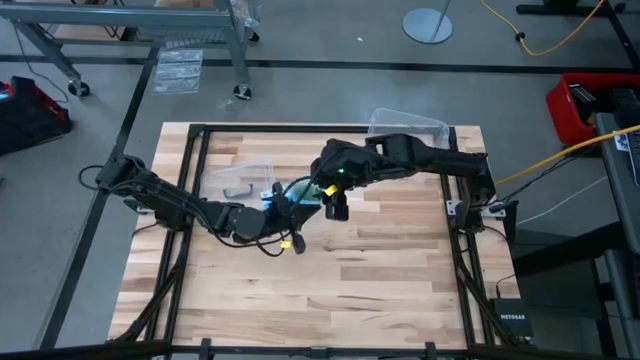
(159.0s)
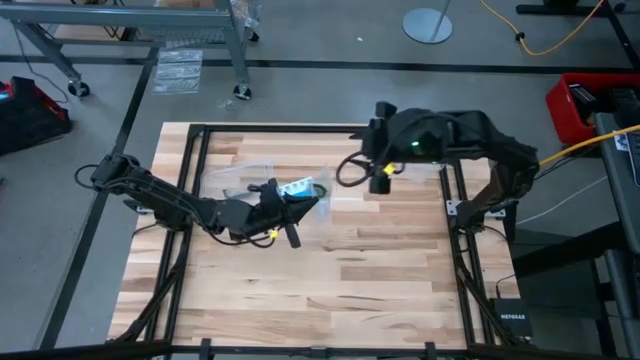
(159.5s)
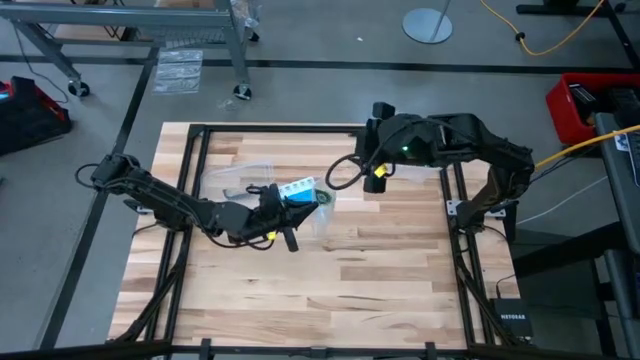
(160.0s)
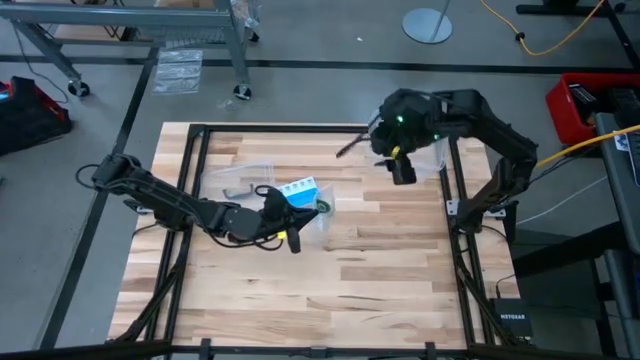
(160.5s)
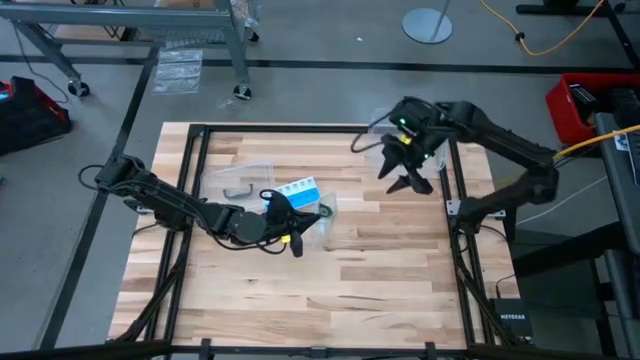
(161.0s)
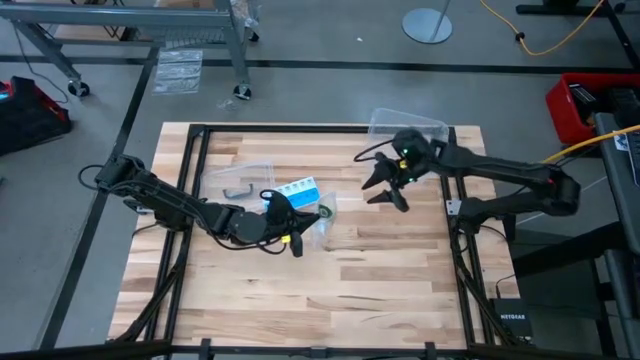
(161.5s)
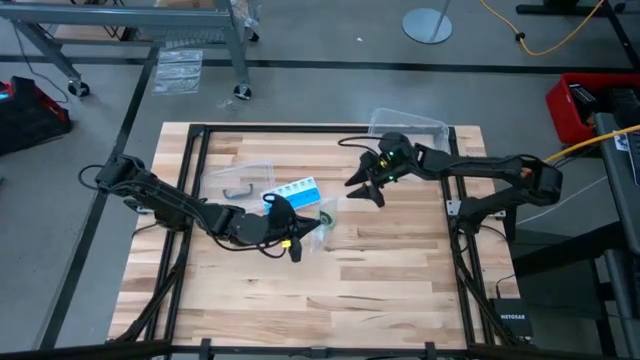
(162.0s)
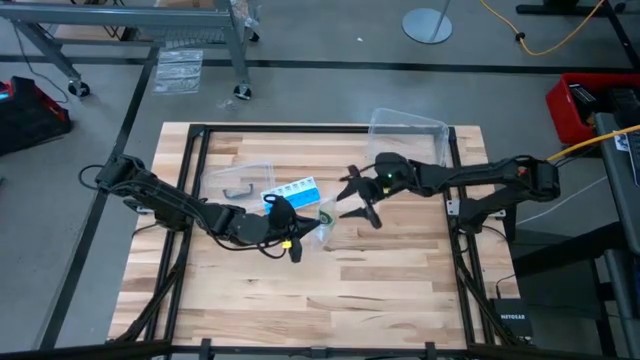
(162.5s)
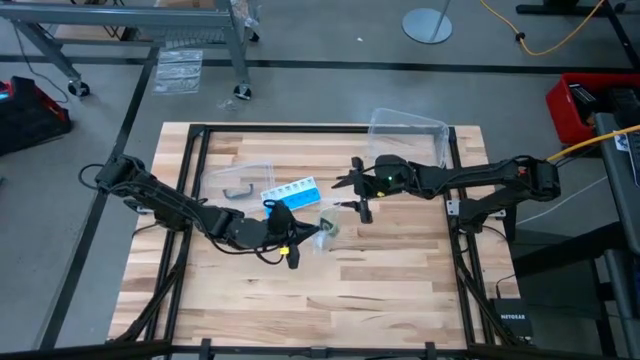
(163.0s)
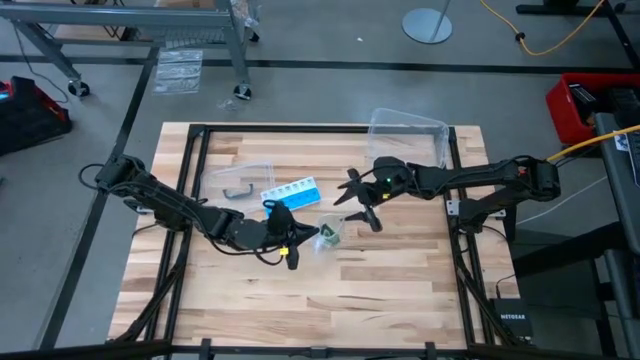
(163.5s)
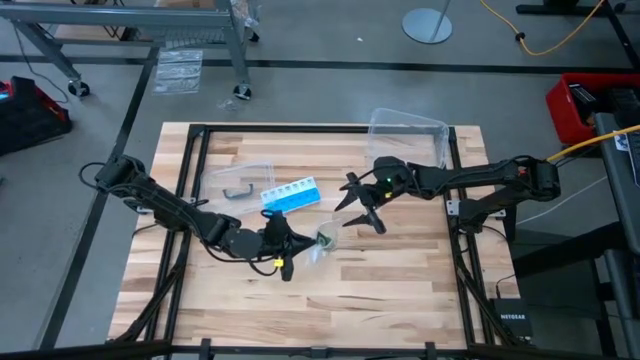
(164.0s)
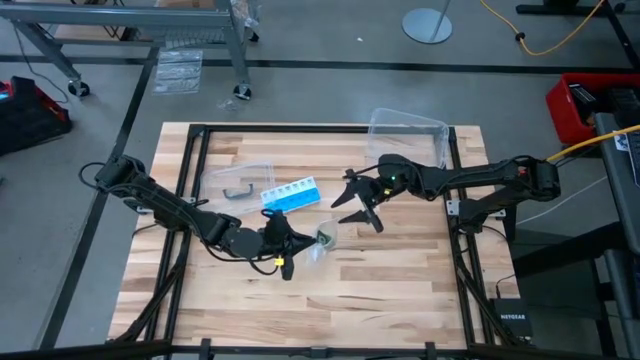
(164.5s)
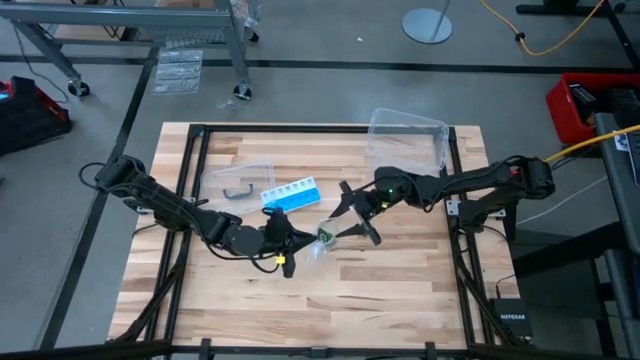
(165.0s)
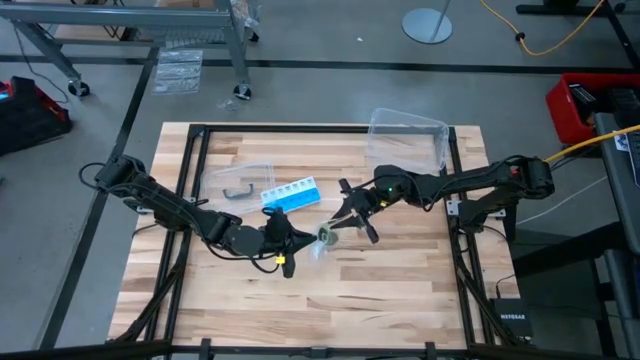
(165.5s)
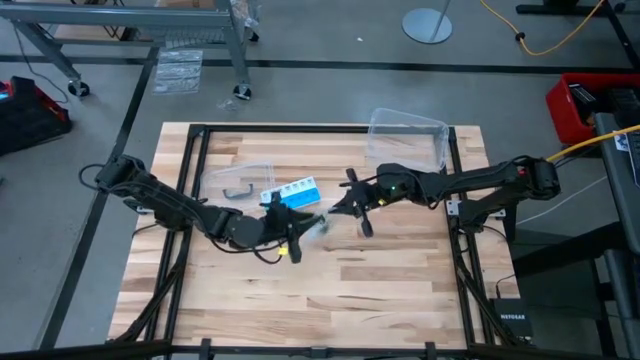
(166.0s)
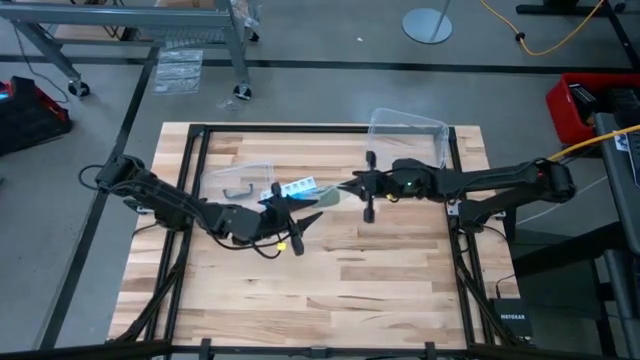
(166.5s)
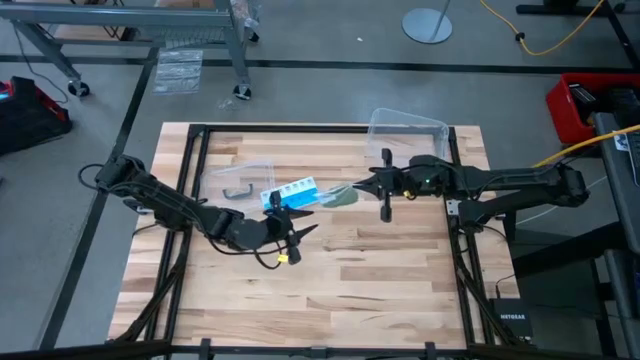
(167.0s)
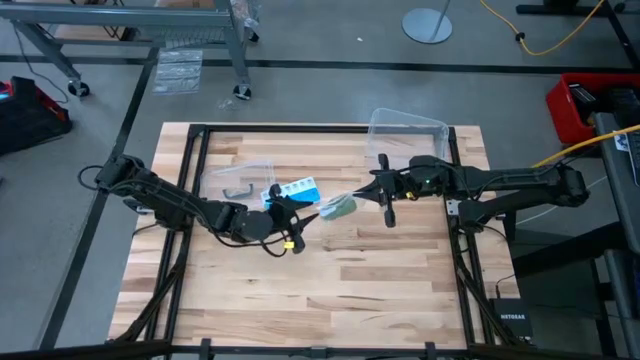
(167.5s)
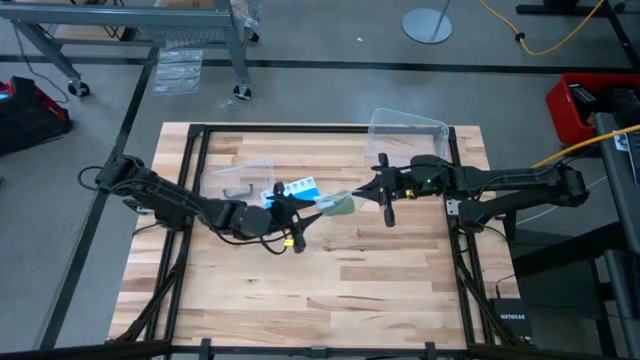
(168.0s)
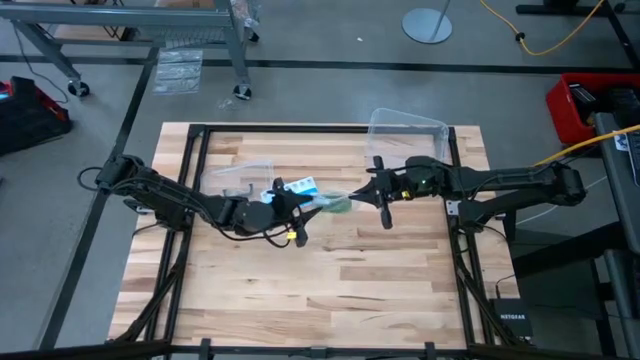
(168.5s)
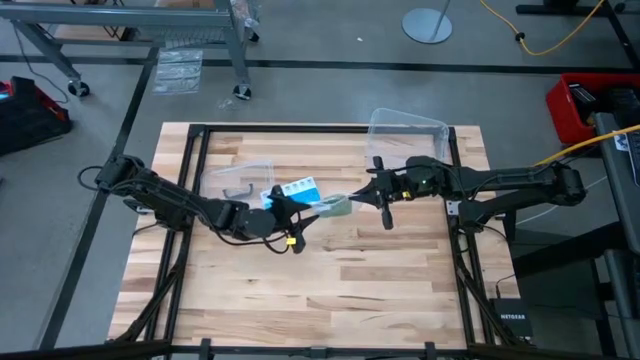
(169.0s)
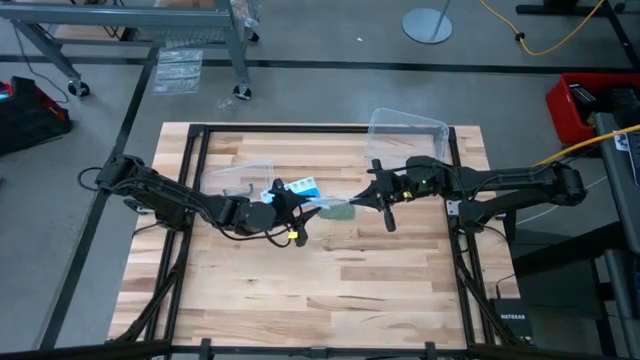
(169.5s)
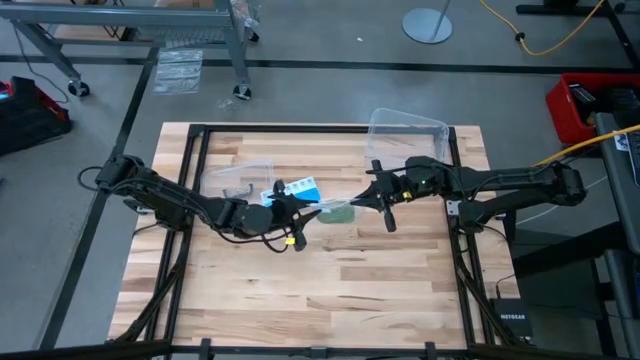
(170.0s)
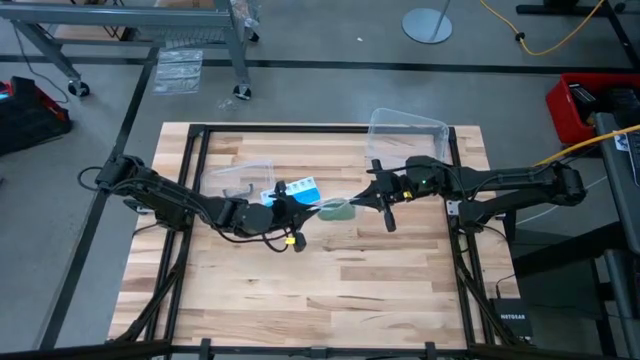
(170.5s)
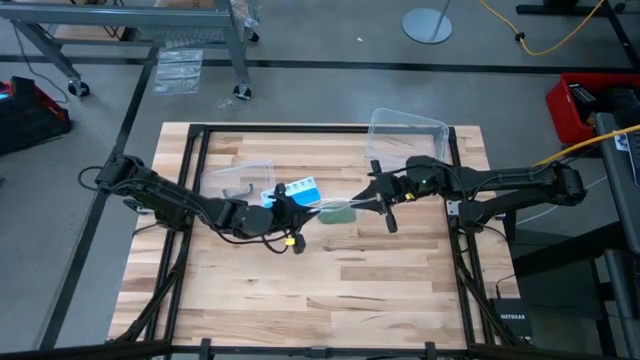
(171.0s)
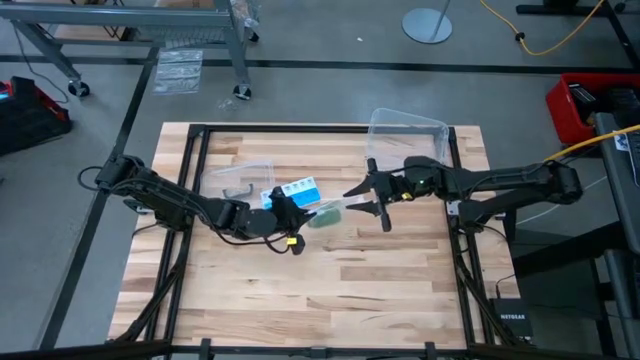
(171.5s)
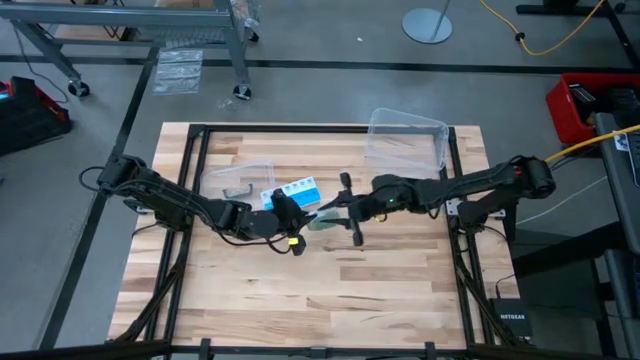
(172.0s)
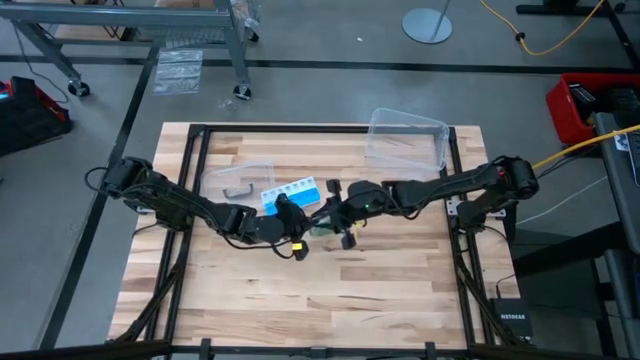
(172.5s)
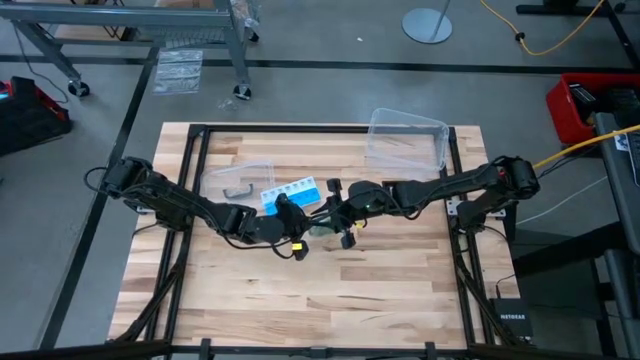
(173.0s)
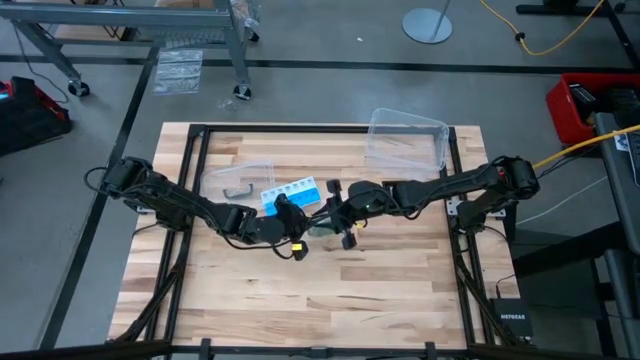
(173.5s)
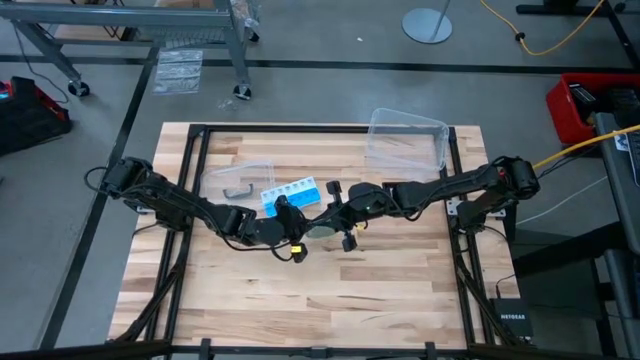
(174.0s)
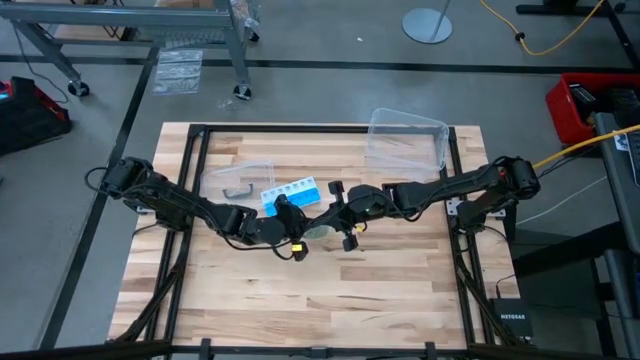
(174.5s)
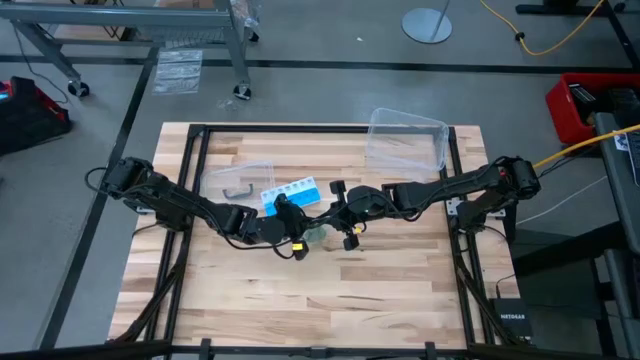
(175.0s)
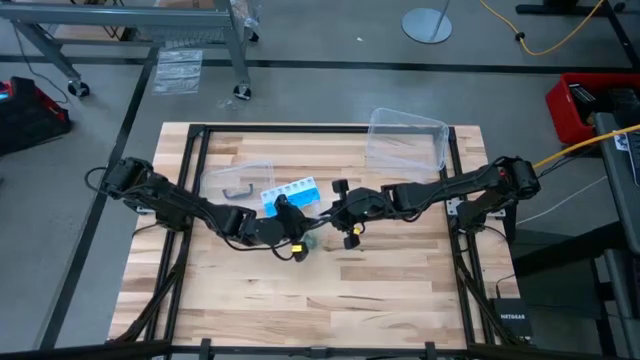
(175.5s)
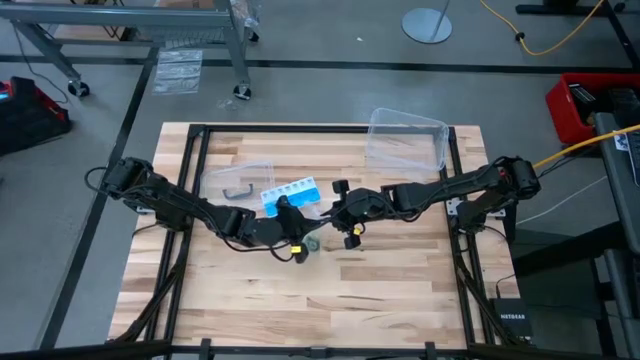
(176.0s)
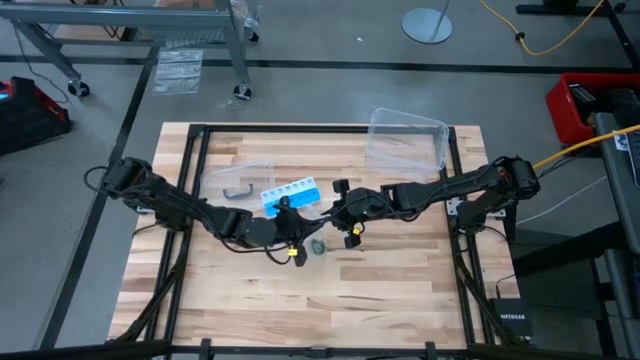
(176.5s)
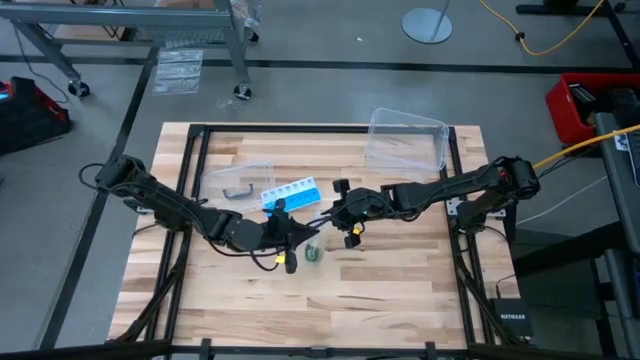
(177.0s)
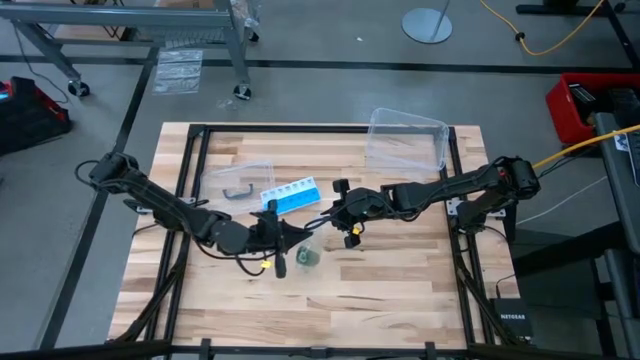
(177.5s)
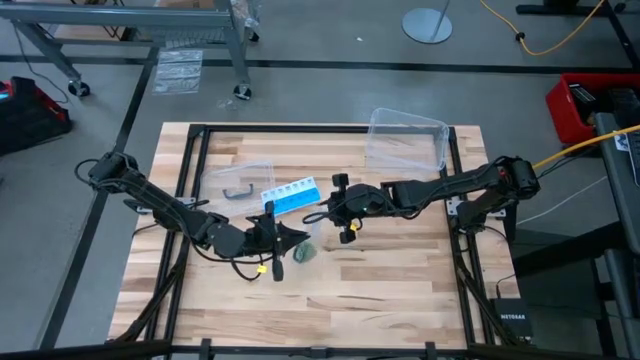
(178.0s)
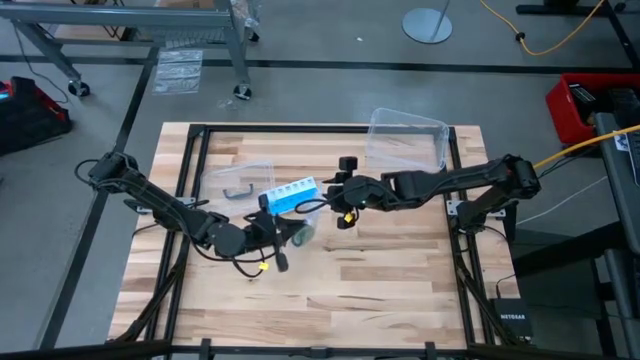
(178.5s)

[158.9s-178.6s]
Task: Roll bandage
Close the transparent zip bag

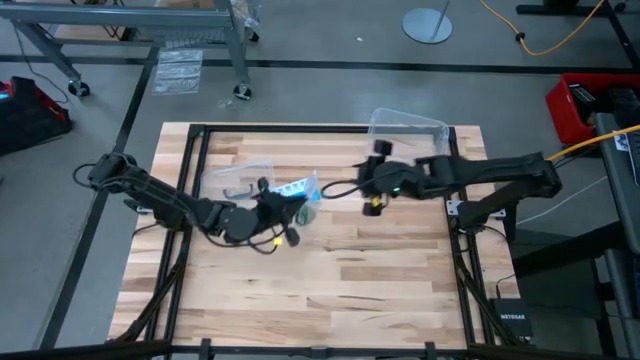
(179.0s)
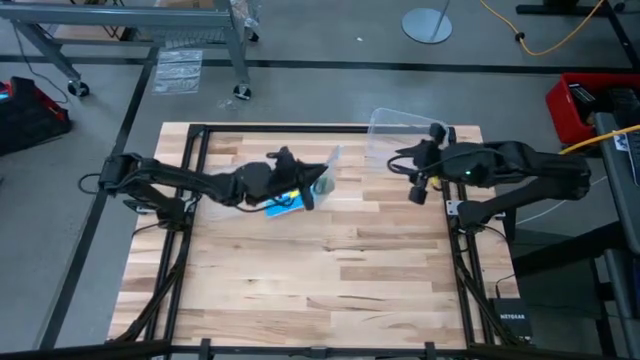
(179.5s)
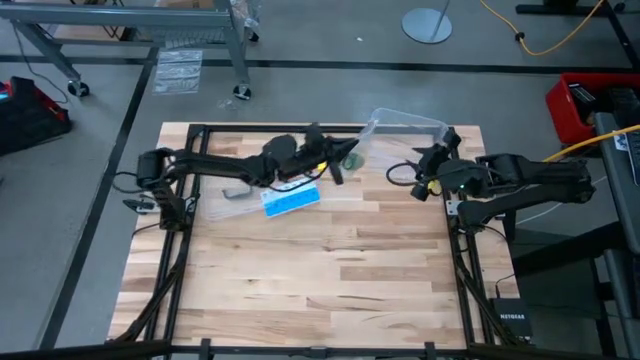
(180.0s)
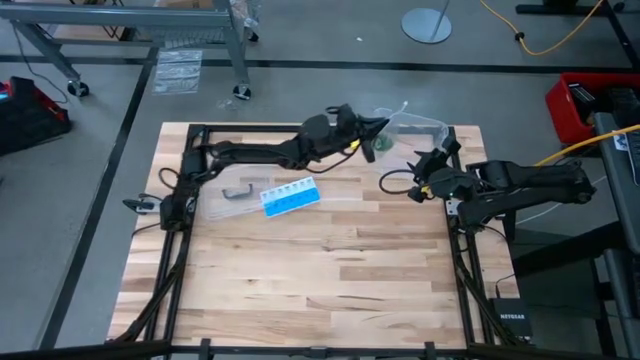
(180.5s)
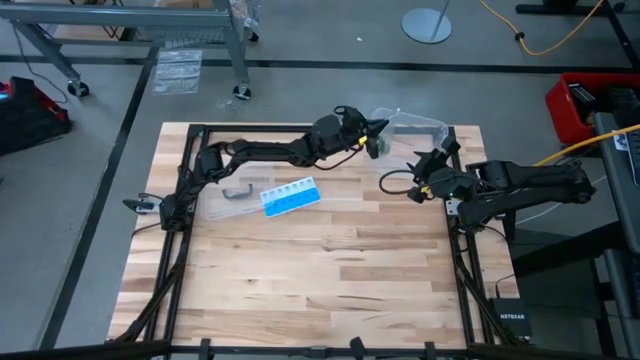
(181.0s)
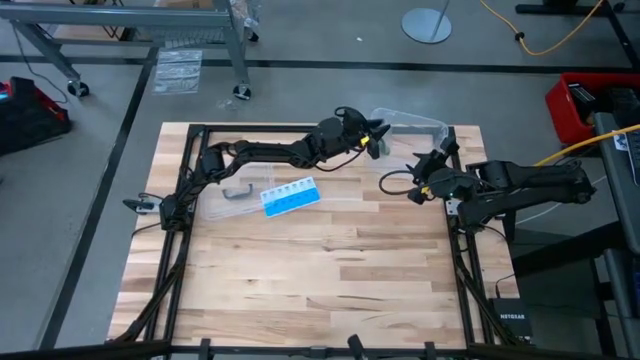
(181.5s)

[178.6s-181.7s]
Put the transparent zip bag with the rolled green bandage into the transparent tupperware
